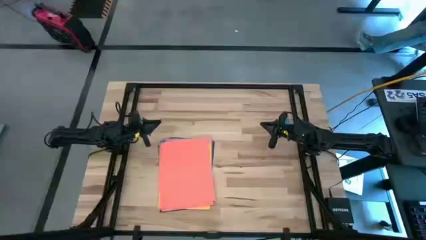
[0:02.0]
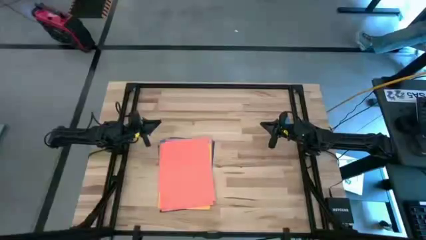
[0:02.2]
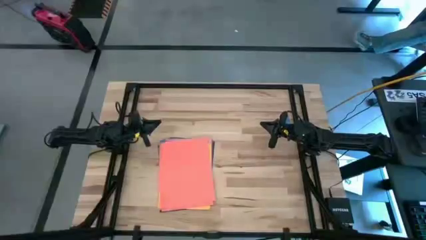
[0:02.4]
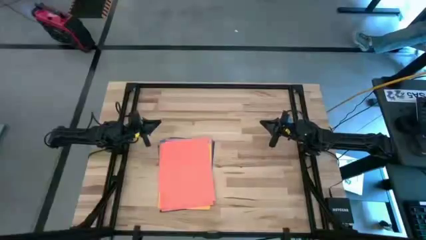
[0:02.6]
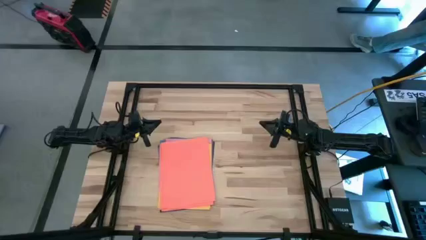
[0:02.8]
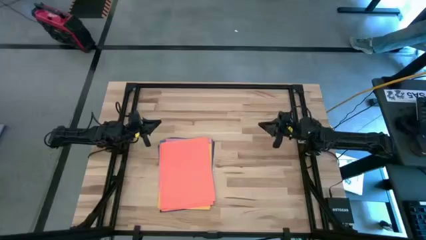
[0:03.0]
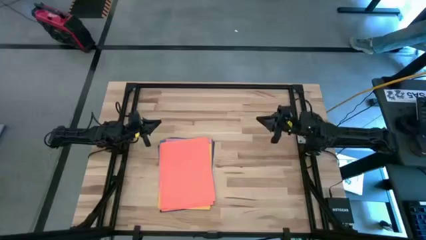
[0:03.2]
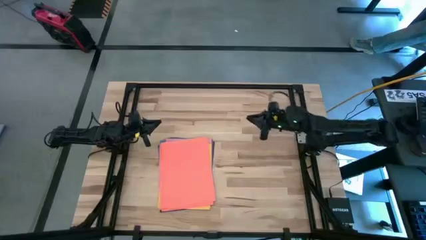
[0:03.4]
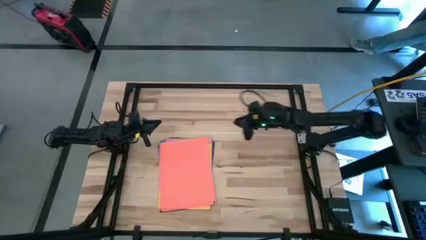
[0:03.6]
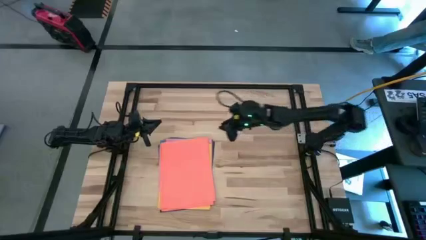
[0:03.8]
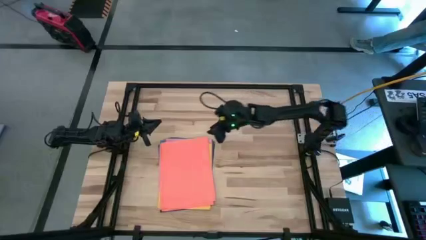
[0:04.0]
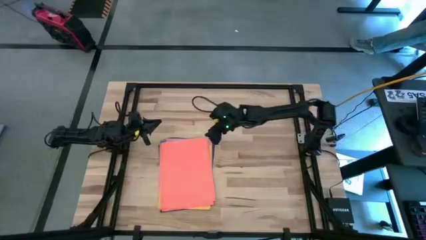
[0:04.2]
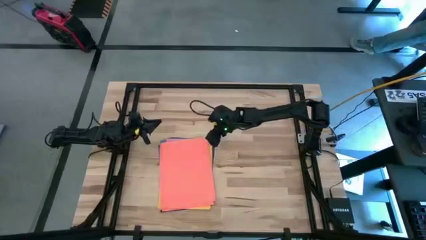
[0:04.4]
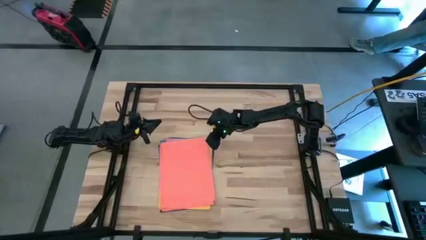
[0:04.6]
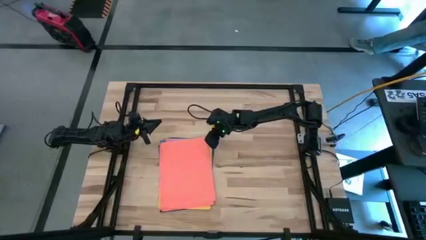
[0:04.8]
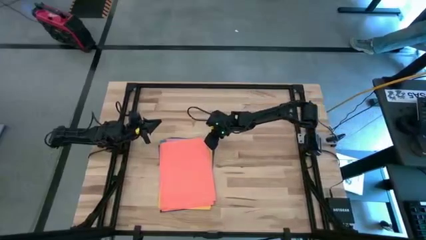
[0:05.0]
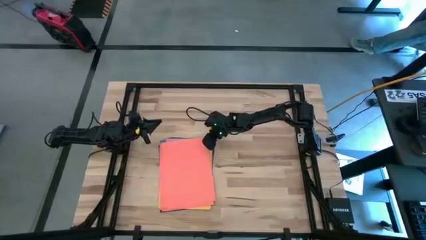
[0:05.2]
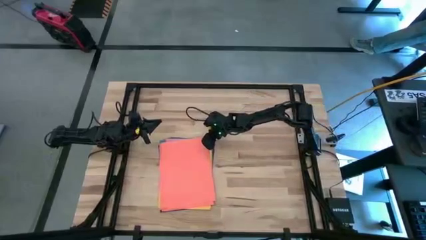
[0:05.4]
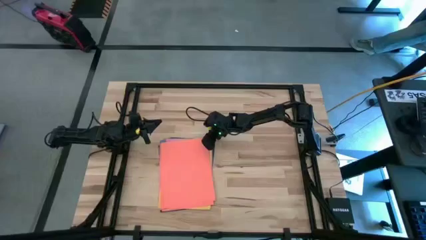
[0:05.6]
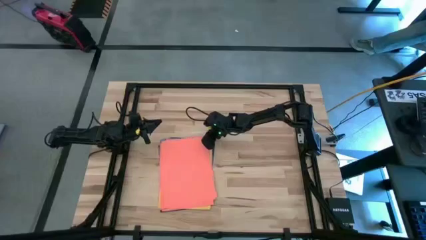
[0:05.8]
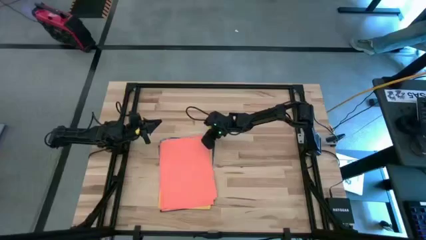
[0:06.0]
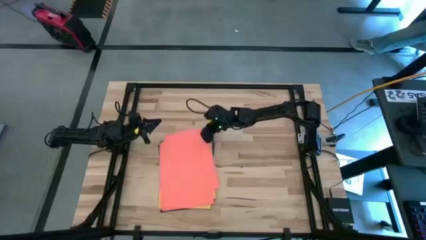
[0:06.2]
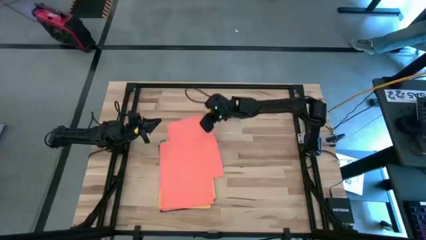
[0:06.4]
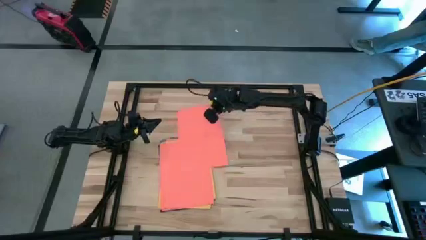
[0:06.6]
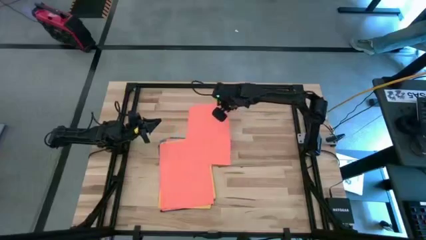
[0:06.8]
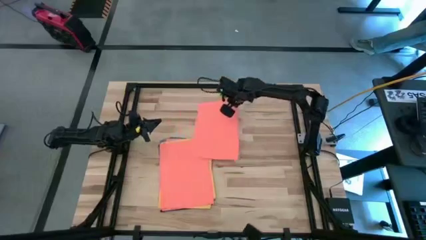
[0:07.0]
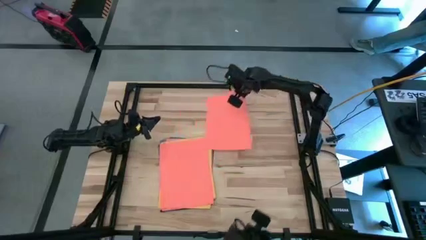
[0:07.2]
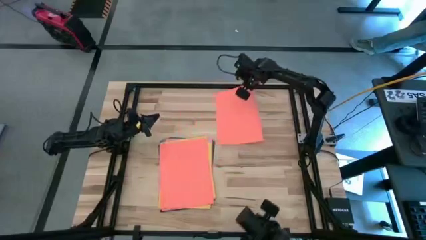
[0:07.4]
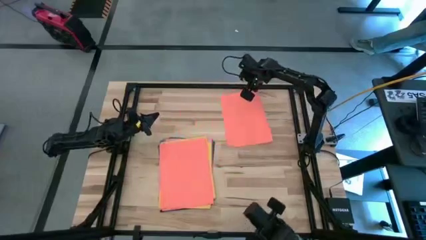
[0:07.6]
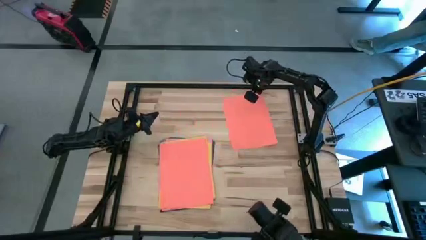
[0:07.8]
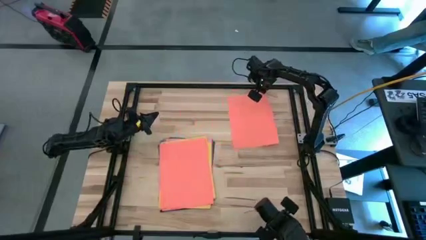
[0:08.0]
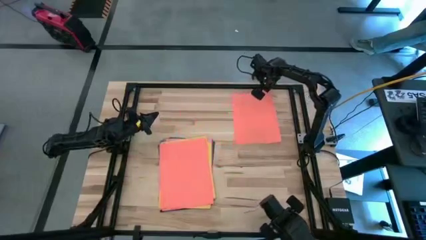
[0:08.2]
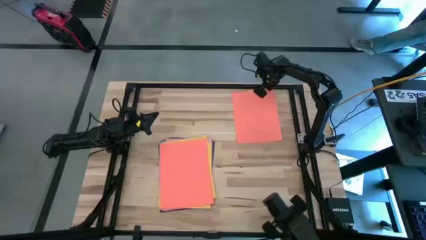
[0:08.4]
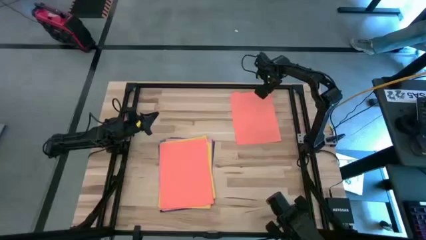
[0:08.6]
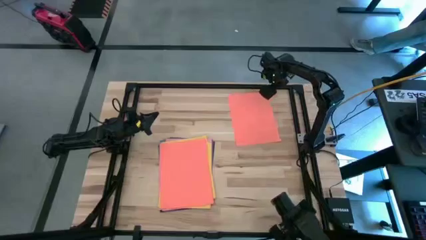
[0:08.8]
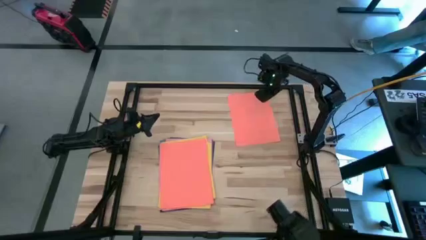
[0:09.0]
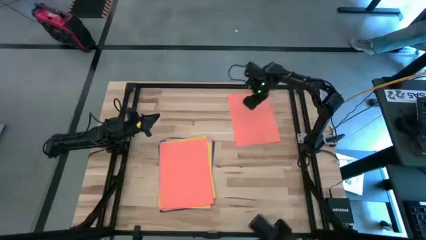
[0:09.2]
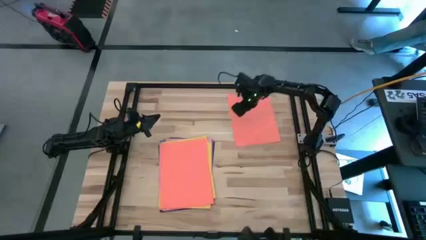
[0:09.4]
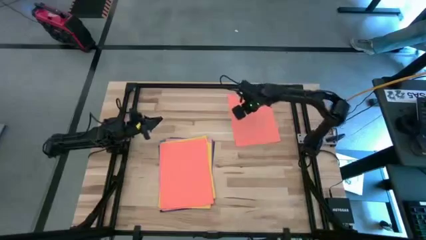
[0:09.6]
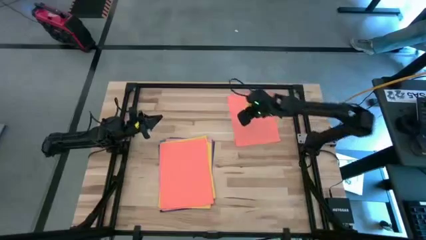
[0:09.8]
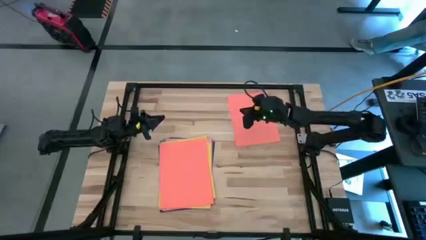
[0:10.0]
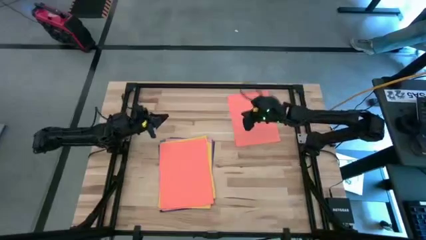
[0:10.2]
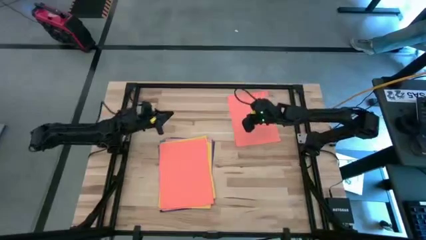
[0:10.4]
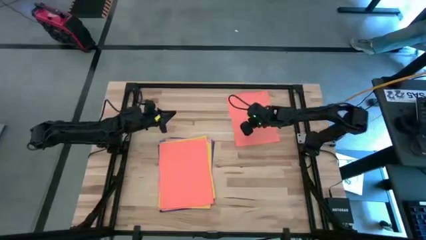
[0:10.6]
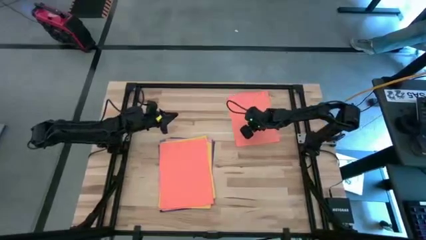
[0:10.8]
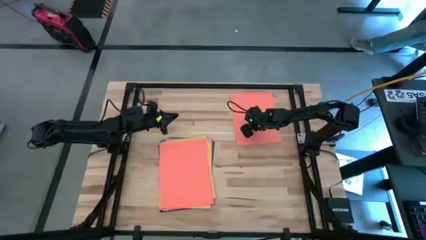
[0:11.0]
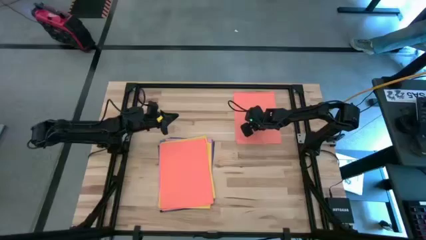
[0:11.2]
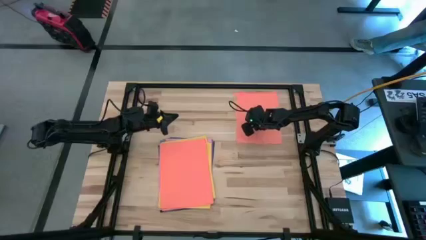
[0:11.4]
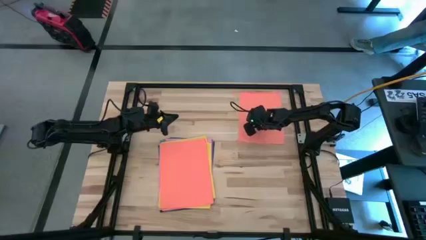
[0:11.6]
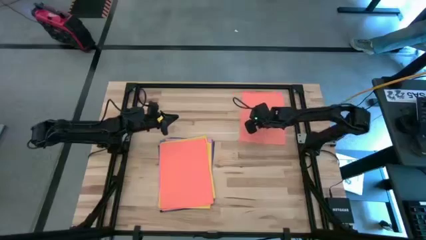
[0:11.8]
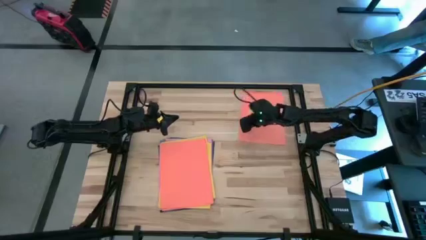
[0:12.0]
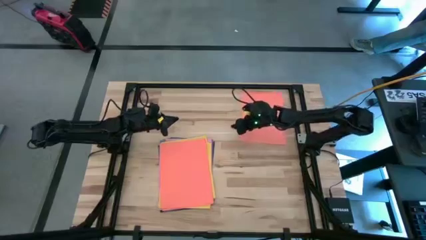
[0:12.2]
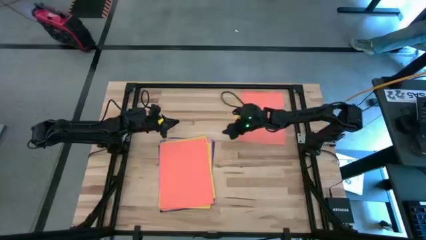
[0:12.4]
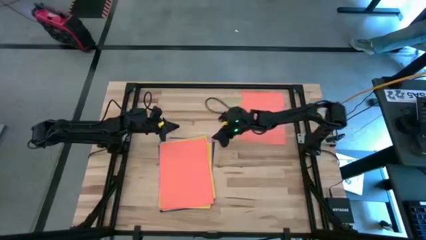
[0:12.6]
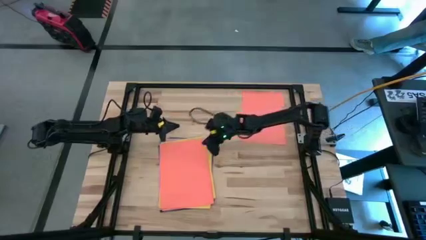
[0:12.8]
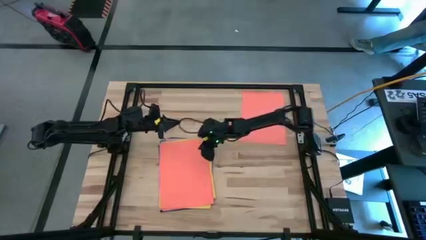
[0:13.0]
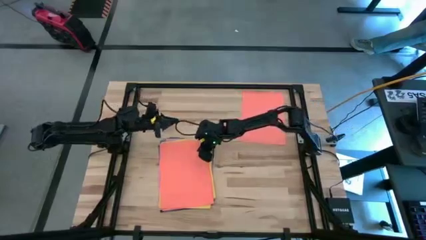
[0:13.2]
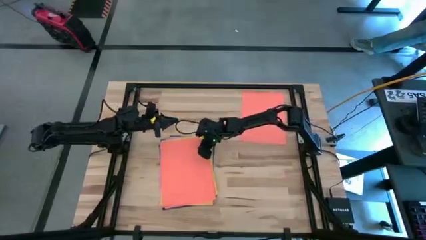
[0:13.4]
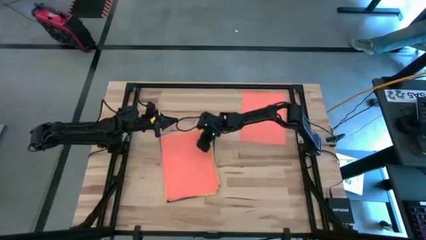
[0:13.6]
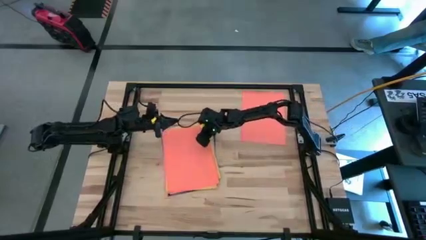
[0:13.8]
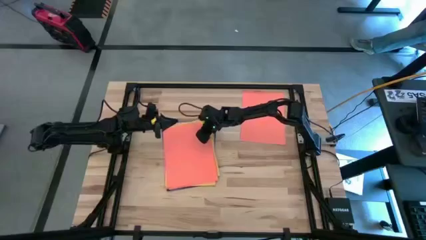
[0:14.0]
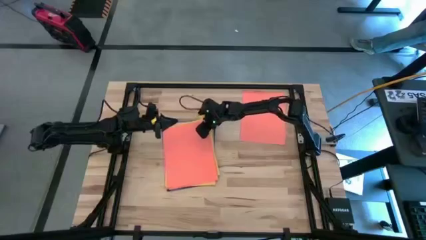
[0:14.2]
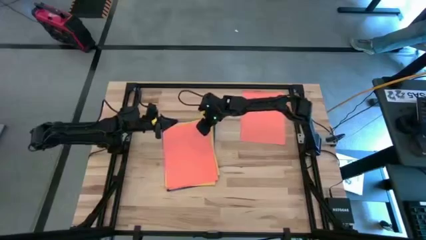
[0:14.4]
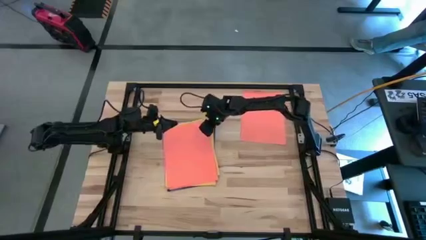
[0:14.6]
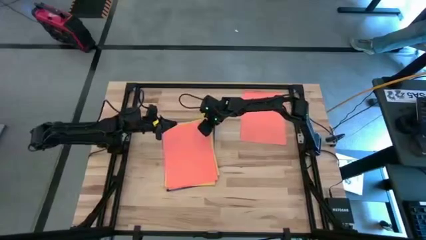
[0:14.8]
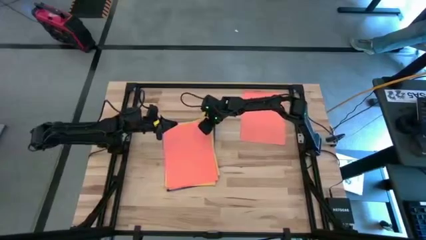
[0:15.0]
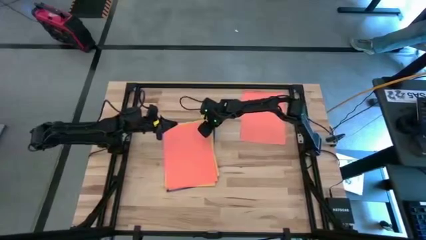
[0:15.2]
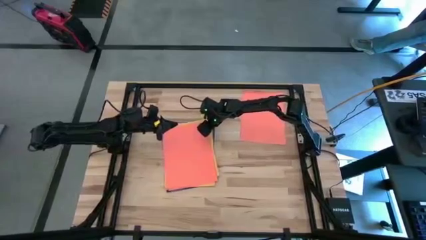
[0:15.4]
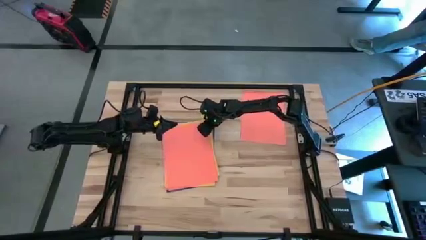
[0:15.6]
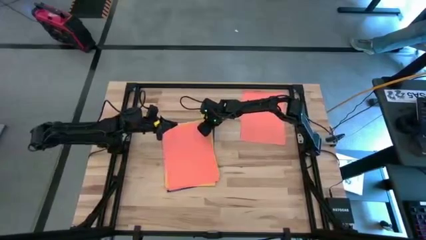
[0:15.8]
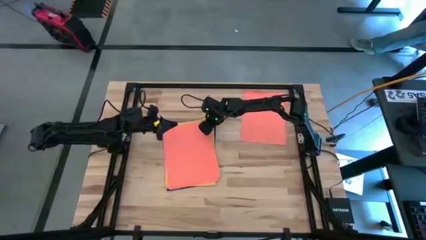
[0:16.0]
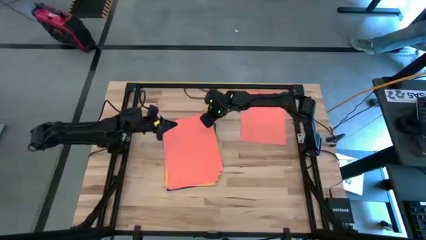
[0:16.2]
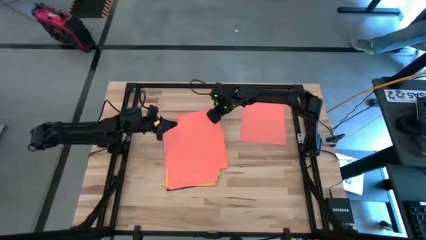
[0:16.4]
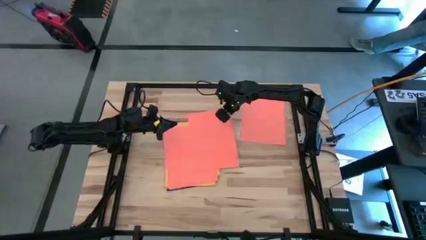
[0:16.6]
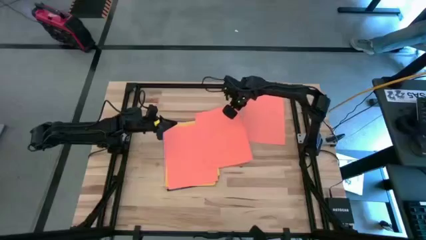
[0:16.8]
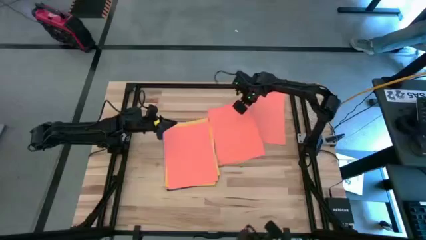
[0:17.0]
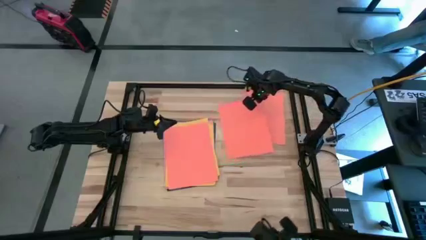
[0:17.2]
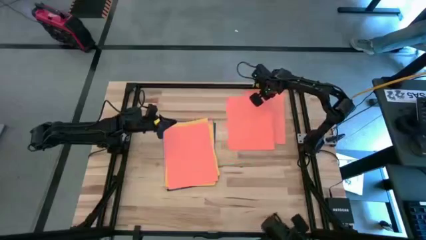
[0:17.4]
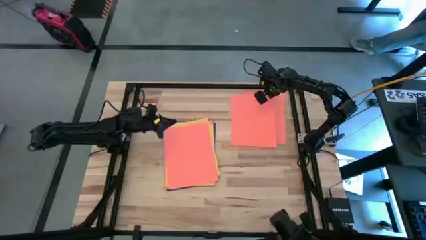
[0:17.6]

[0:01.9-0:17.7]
Task: Organize paper
Put all of the orange paper at the top right of the table
